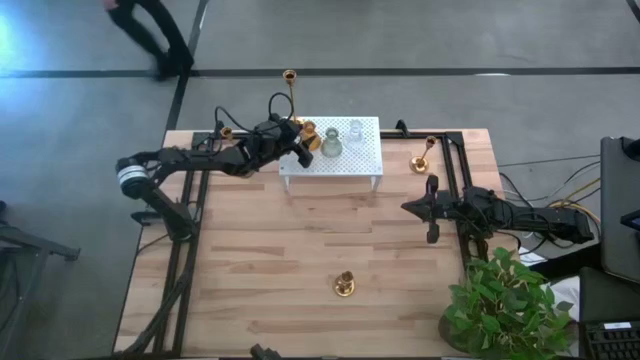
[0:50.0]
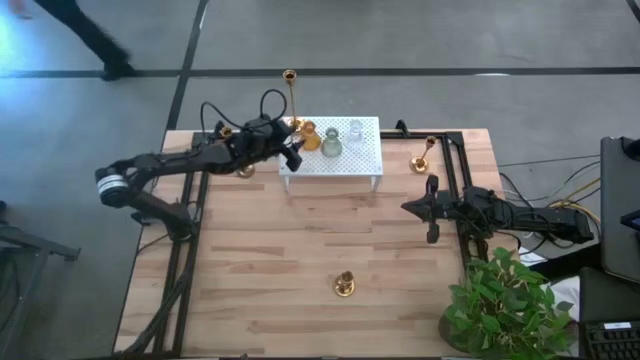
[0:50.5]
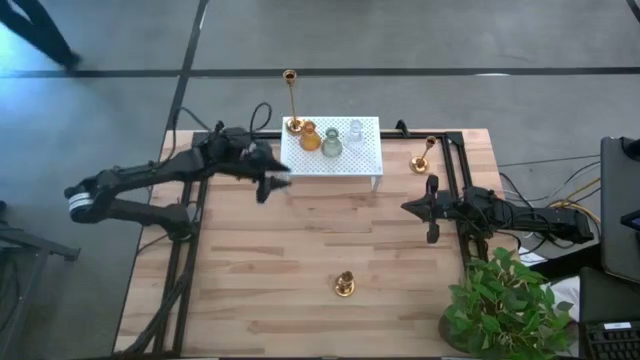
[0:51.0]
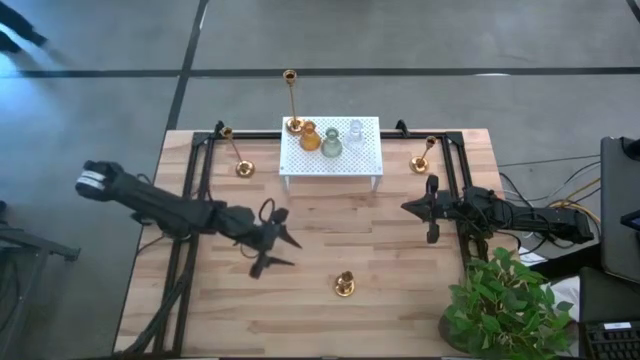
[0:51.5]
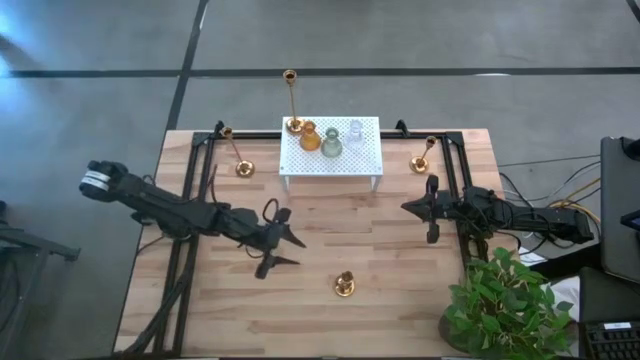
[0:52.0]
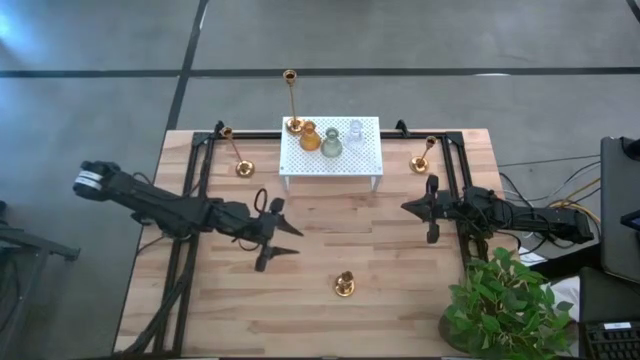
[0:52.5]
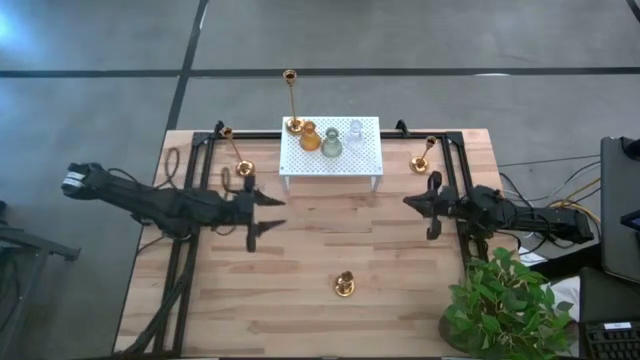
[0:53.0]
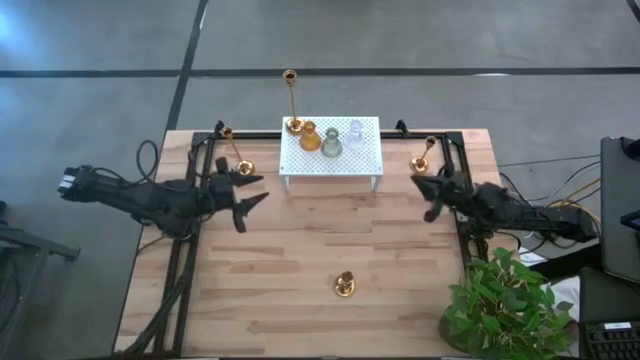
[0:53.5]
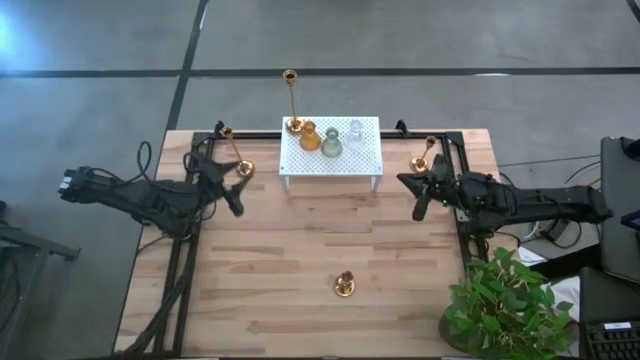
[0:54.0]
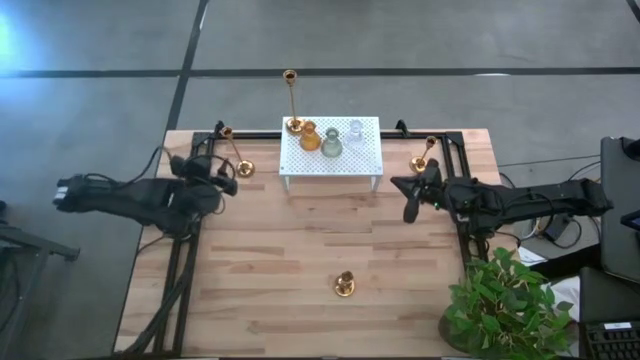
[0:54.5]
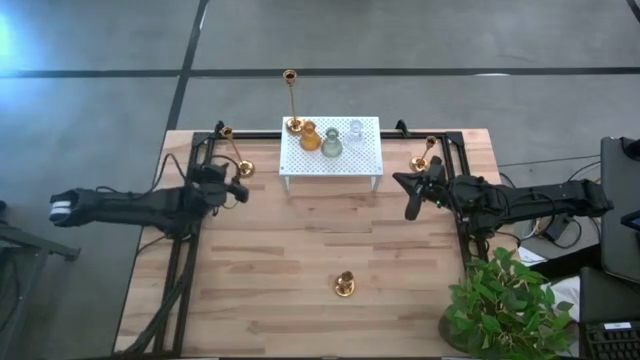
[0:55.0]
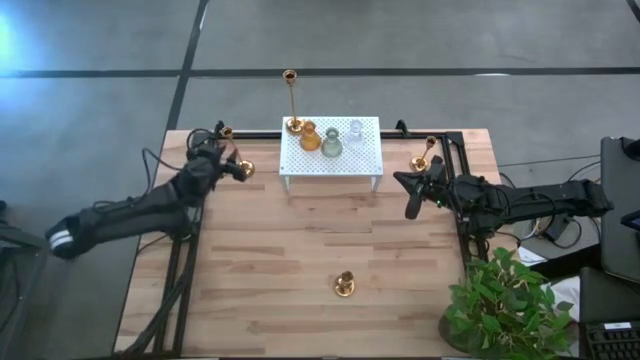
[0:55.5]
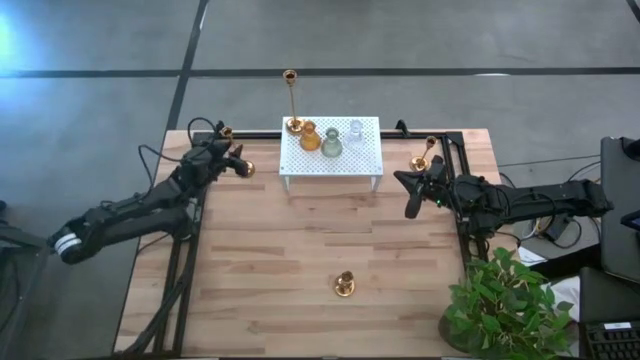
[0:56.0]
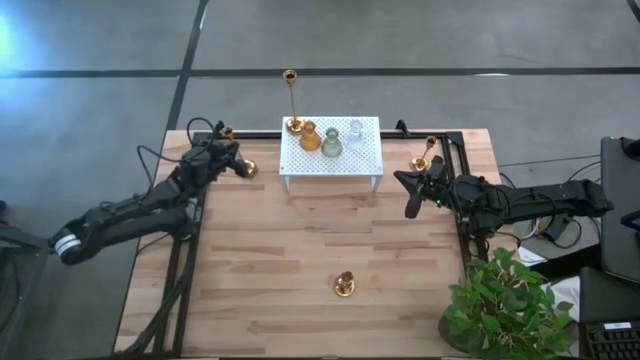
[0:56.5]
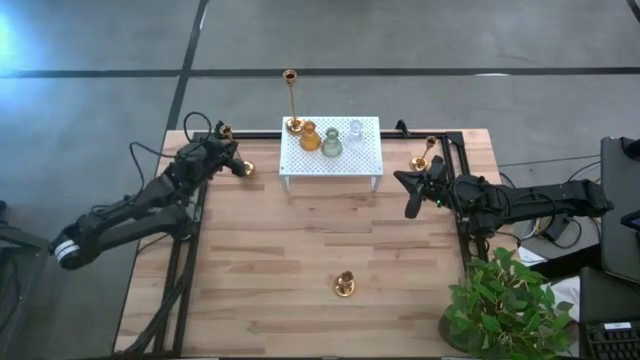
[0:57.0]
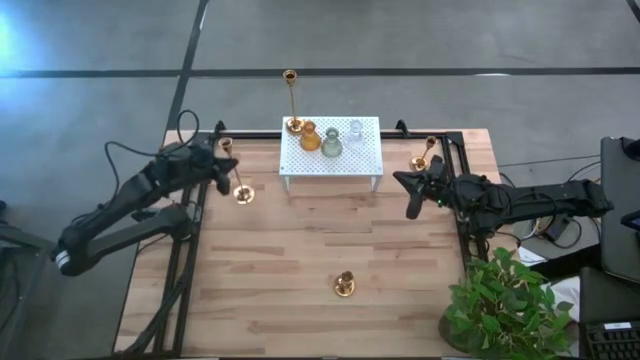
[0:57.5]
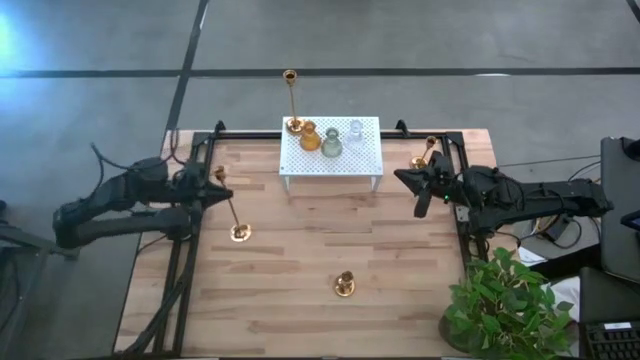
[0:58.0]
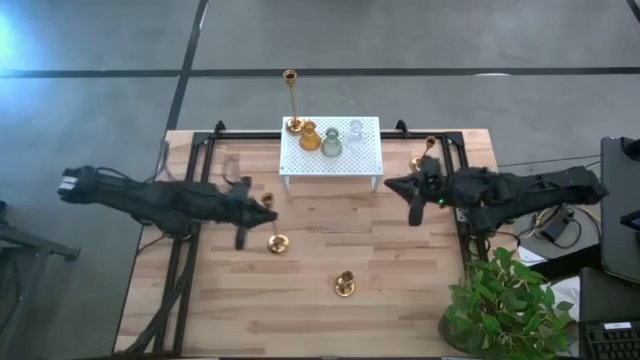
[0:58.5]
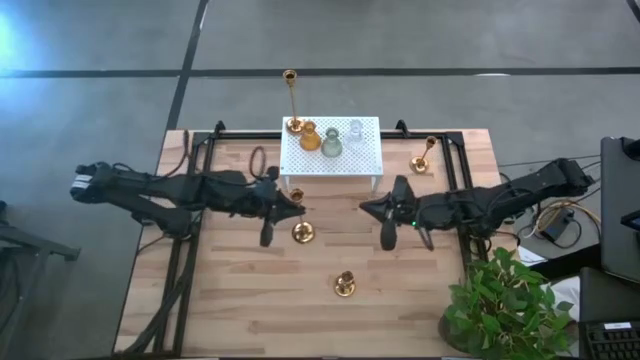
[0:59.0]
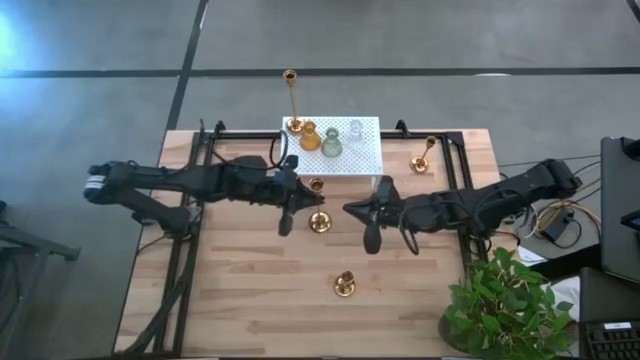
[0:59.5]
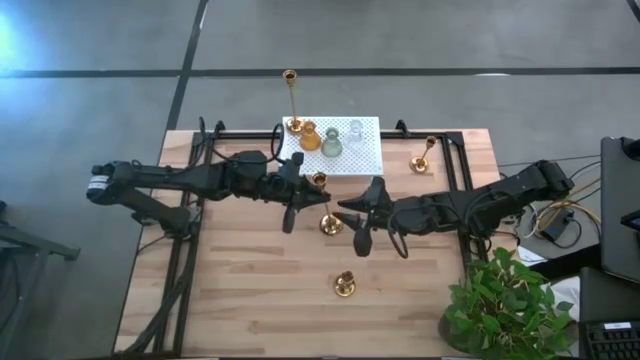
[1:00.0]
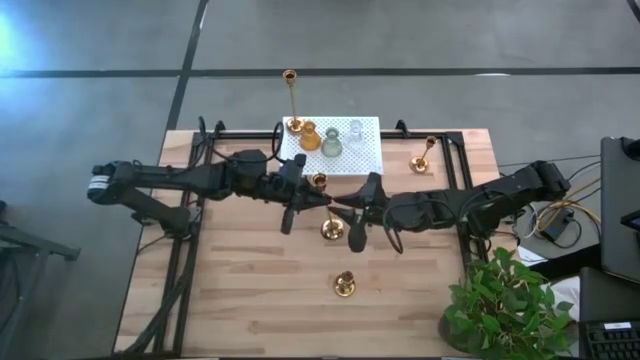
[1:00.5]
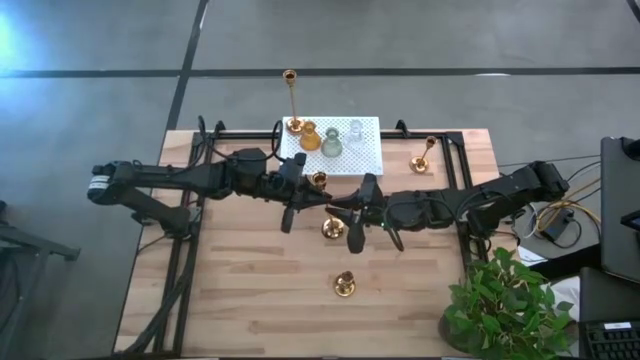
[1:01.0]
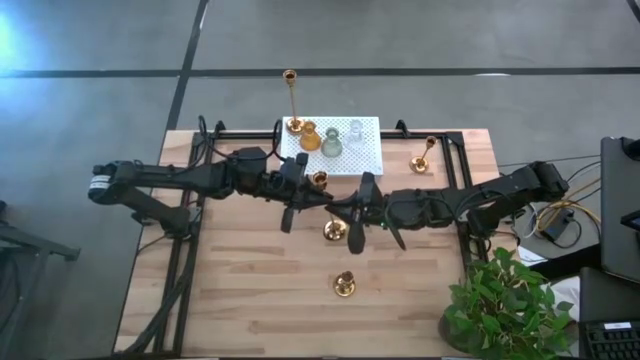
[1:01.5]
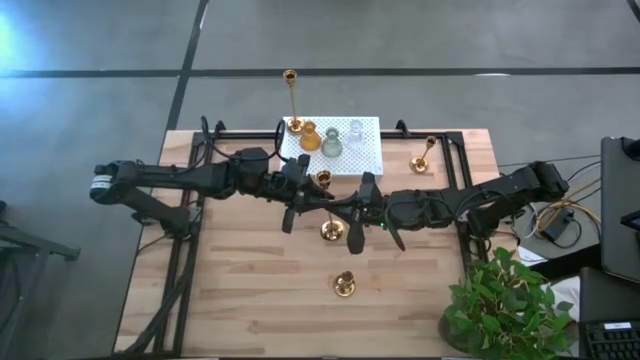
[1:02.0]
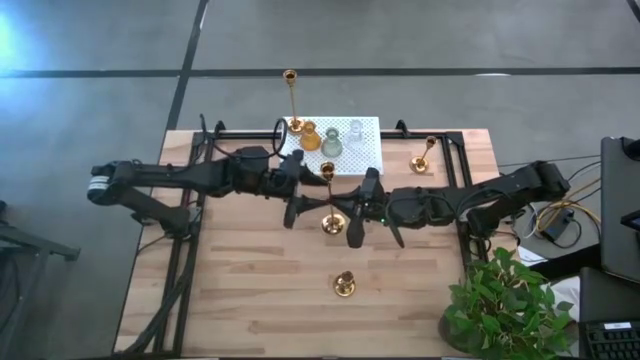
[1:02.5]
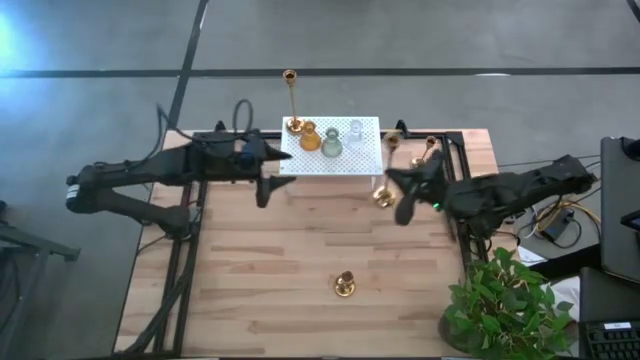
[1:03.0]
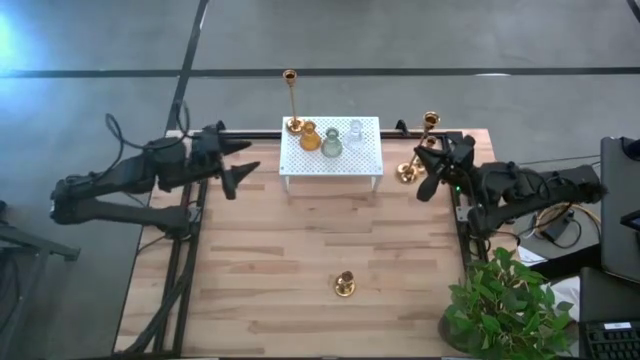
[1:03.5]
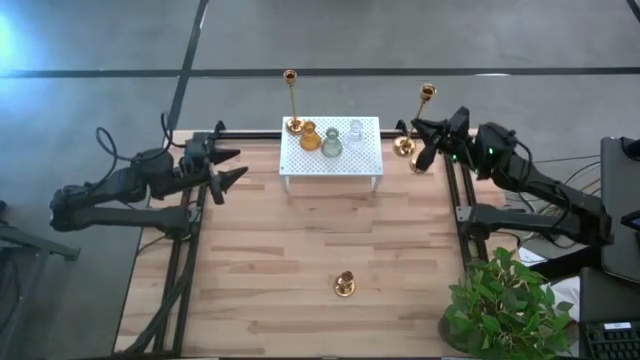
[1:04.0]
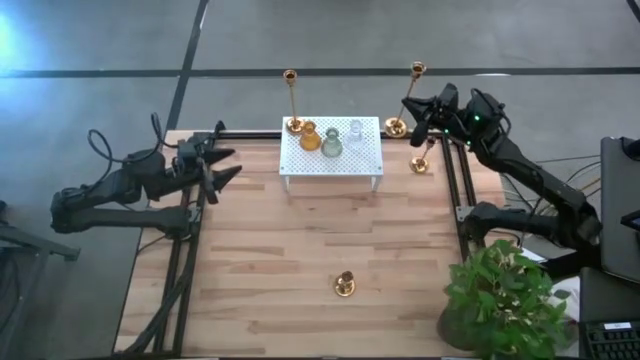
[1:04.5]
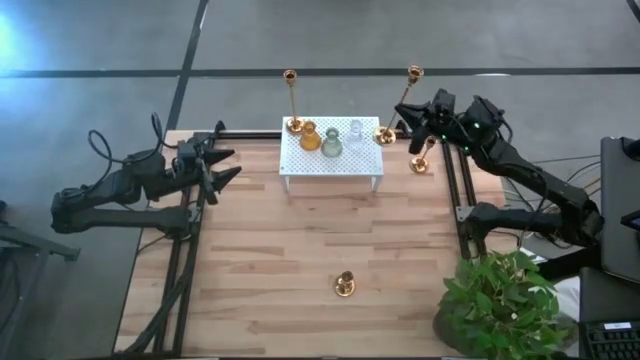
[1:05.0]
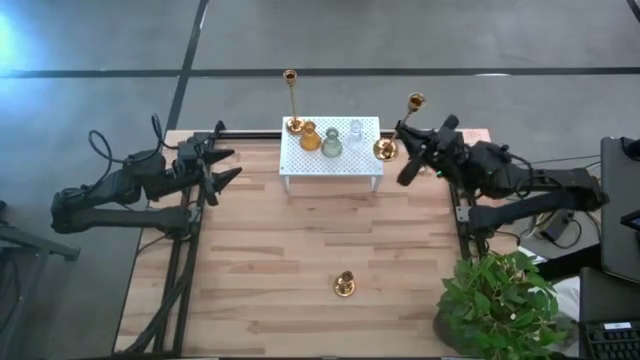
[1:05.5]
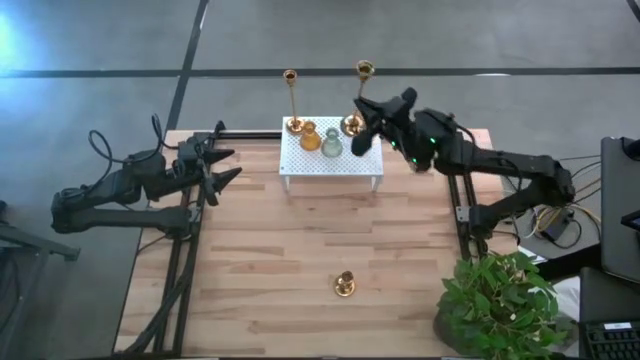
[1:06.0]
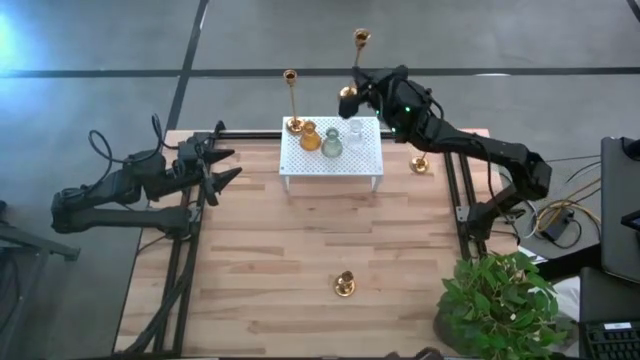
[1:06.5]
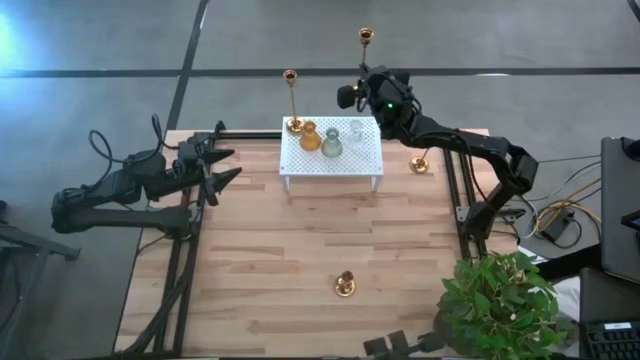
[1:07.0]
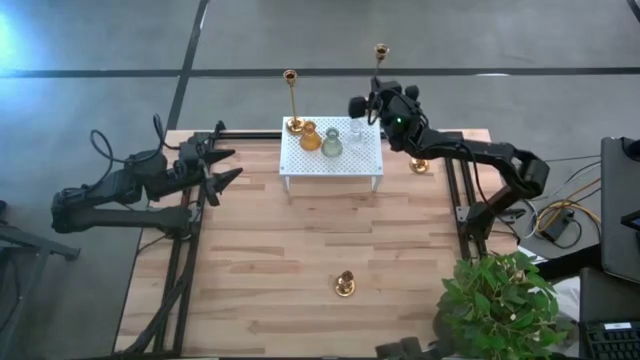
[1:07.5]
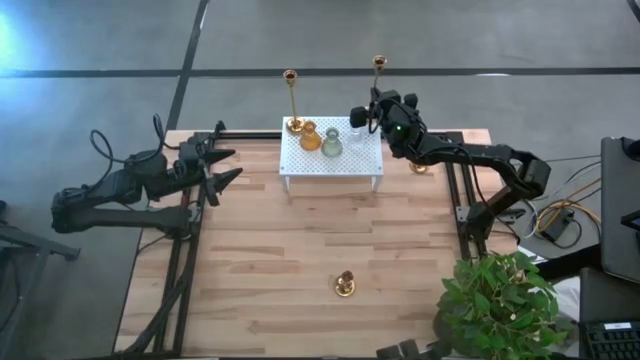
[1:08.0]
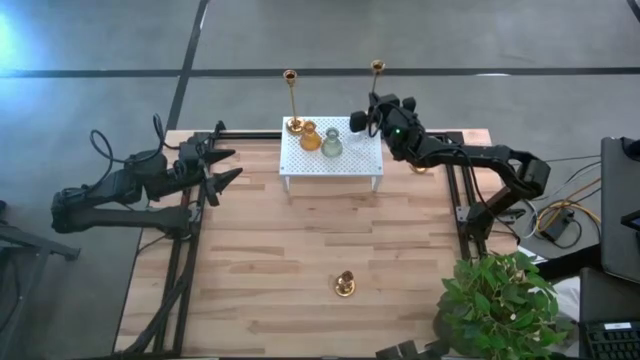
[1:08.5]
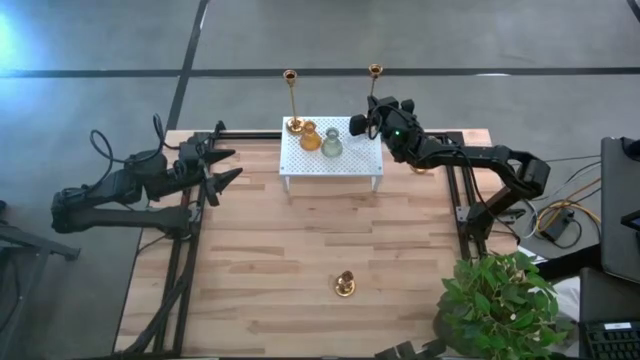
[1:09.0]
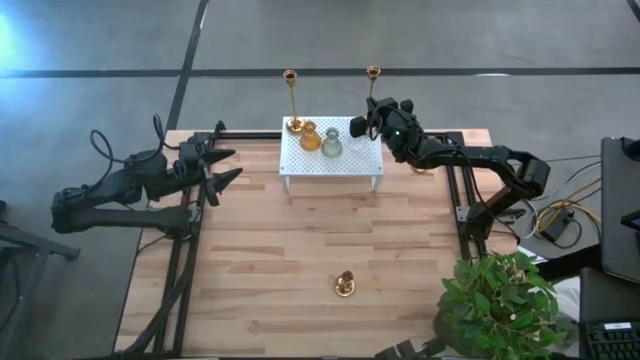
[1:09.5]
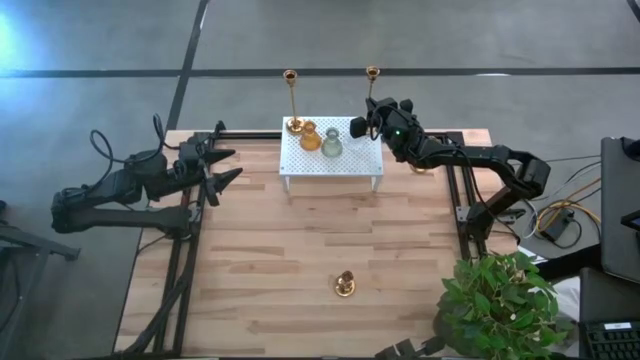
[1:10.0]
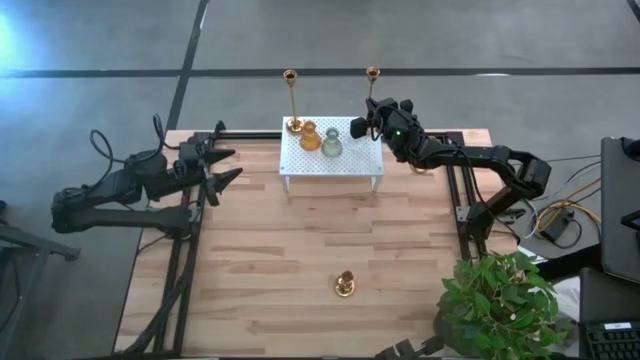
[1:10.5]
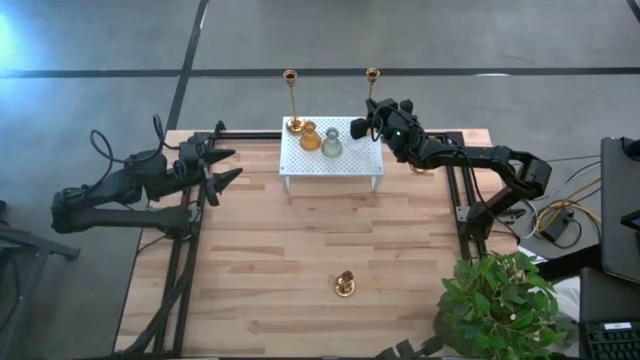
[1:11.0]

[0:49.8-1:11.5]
Task: Pick & Place candle stick holders
Put the yellow candle holder on the shelf
